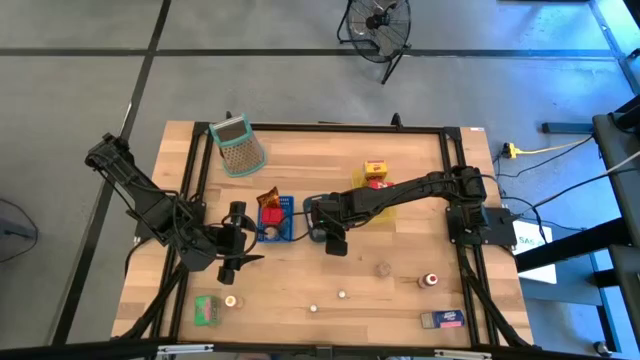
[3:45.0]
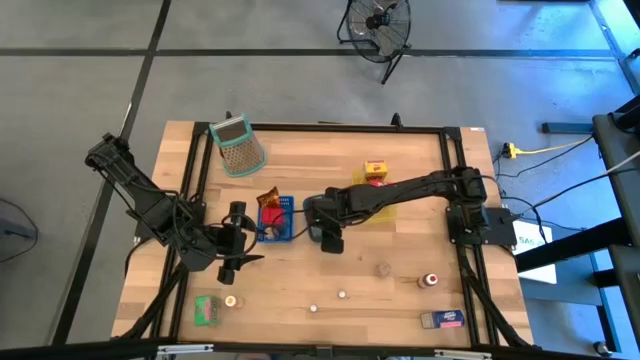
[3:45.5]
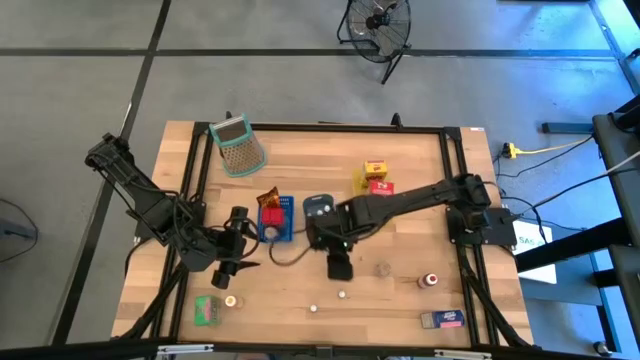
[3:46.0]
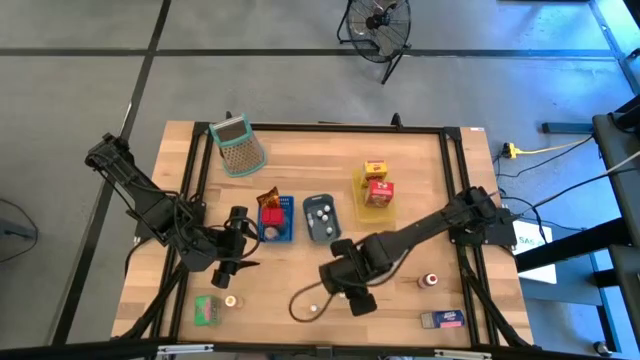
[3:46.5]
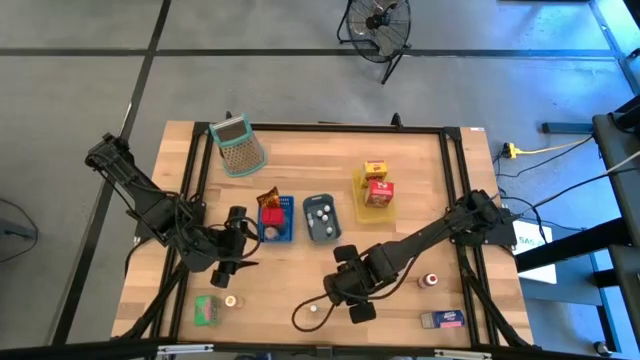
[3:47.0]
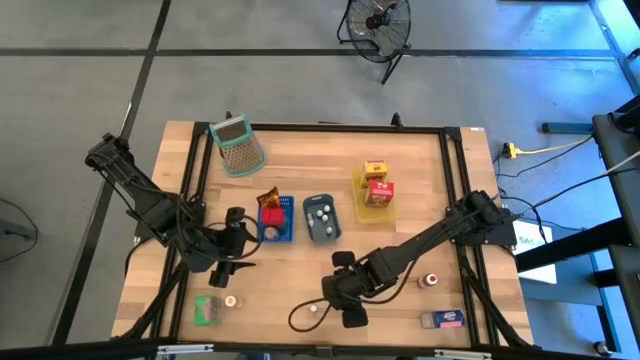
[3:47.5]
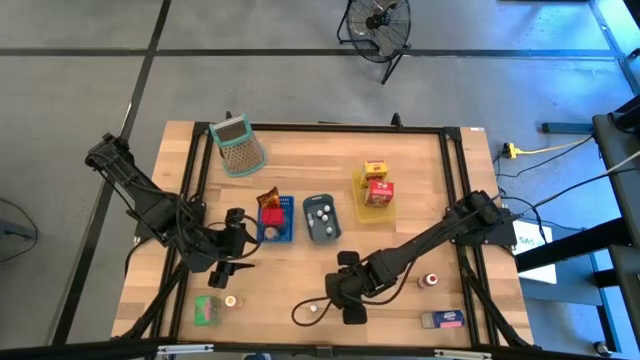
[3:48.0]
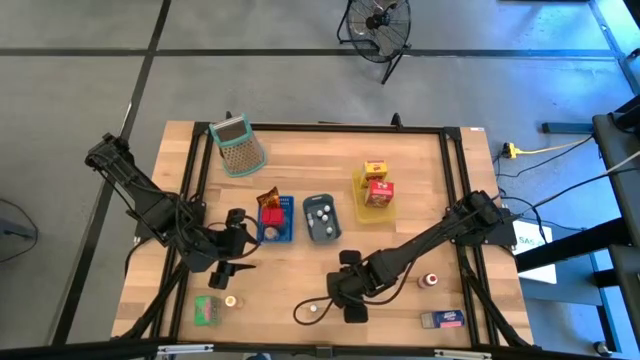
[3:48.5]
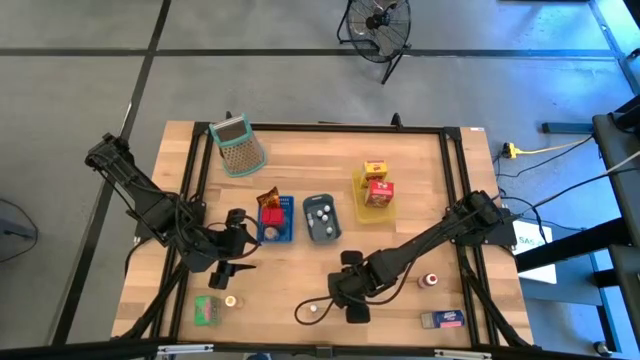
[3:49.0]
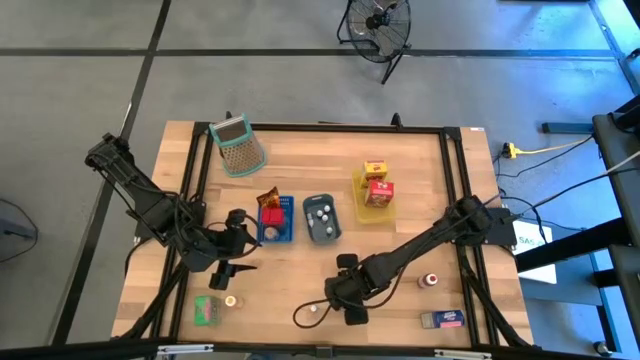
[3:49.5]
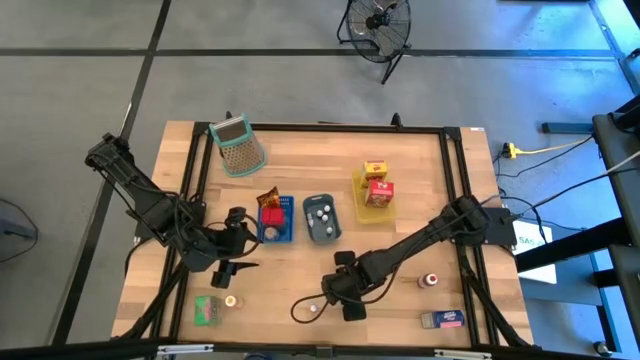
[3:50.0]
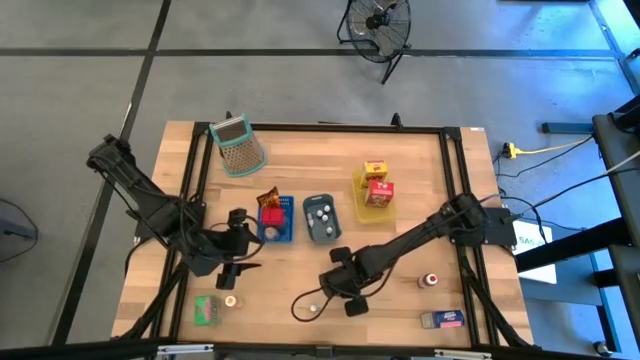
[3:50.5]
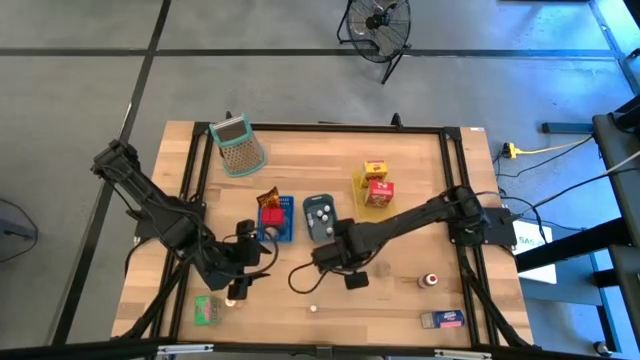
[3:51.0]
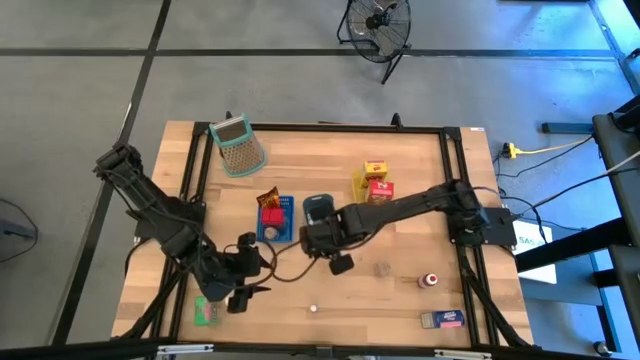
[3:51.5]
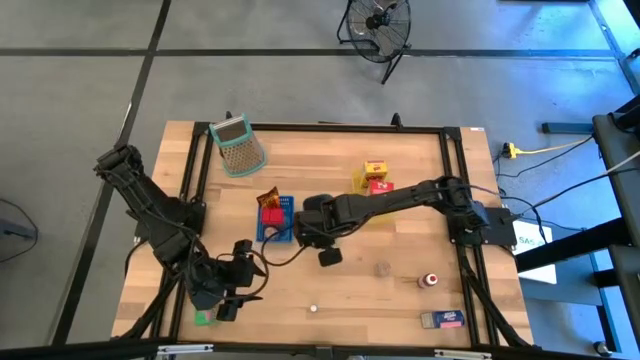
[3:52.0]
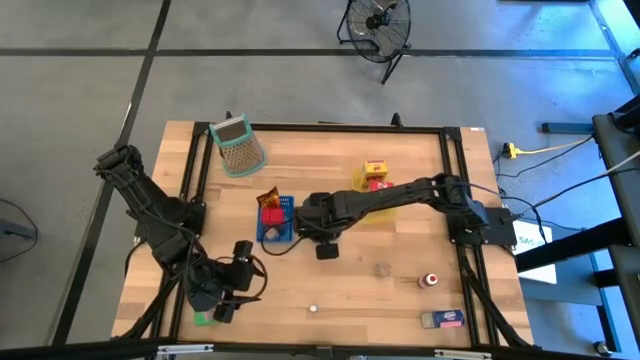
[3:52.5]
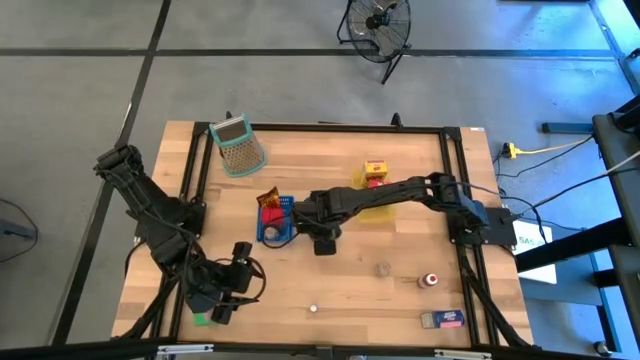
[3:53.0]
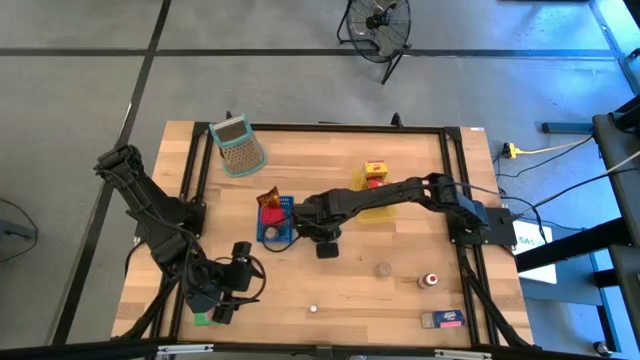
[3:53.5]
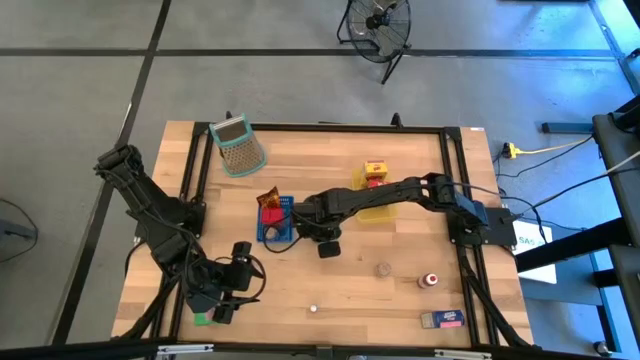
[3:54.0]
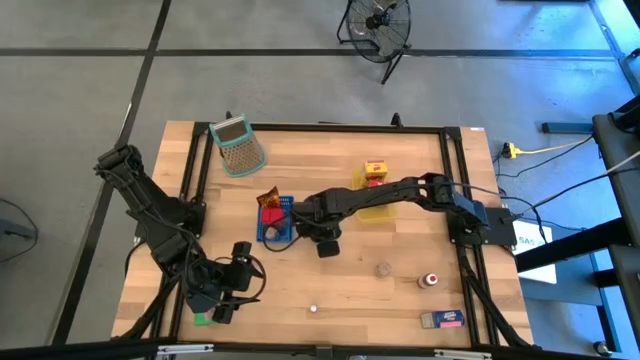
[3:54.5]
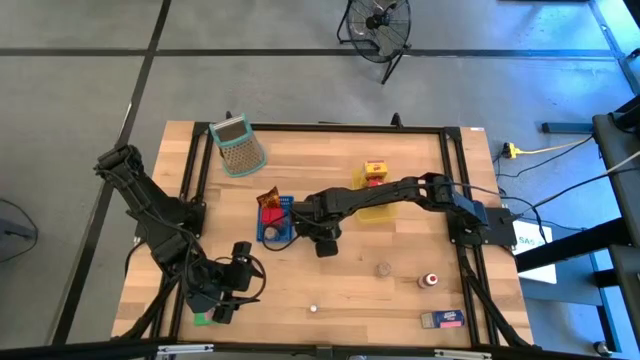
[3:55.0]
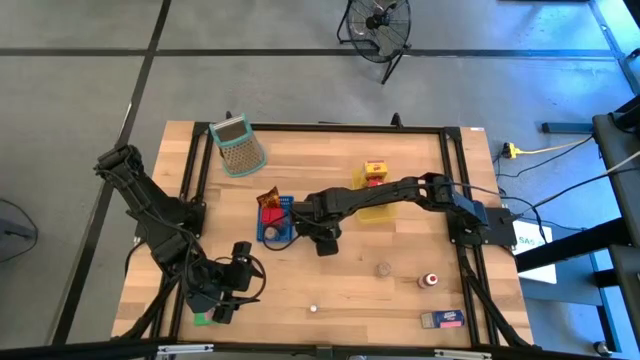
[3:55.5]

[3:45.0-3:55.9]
Task: Pick & Place Kitchen Items
Put the small food coloring bottle into the gray bin

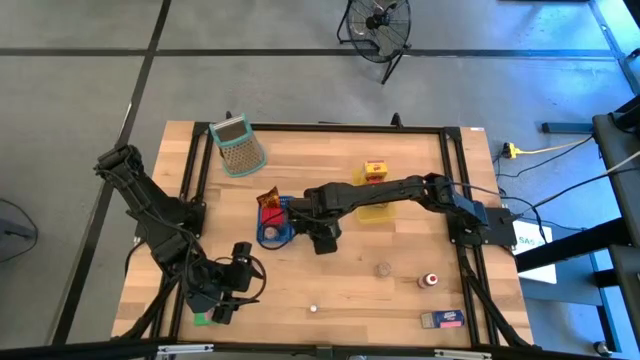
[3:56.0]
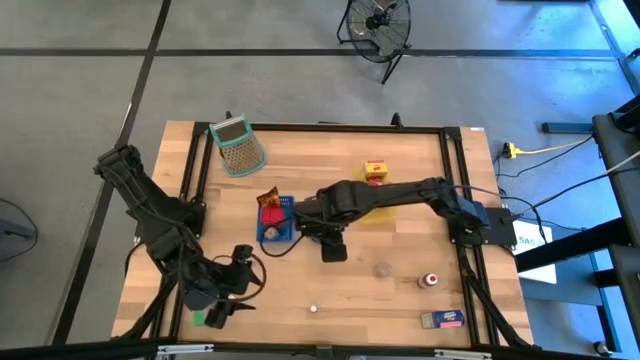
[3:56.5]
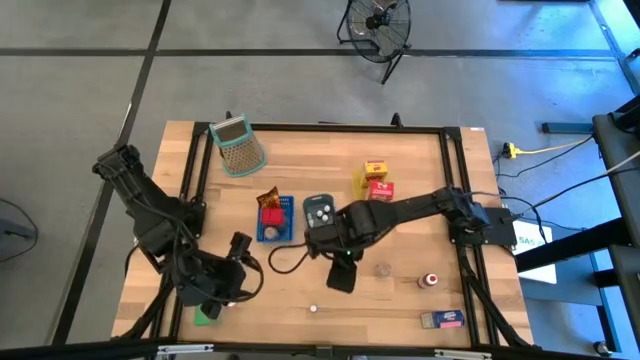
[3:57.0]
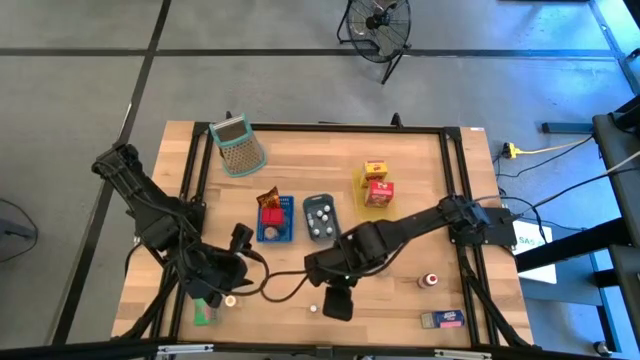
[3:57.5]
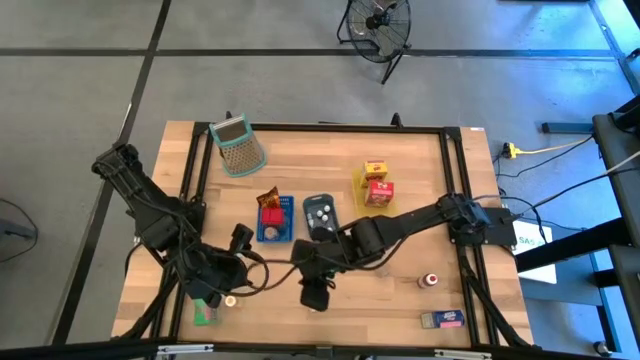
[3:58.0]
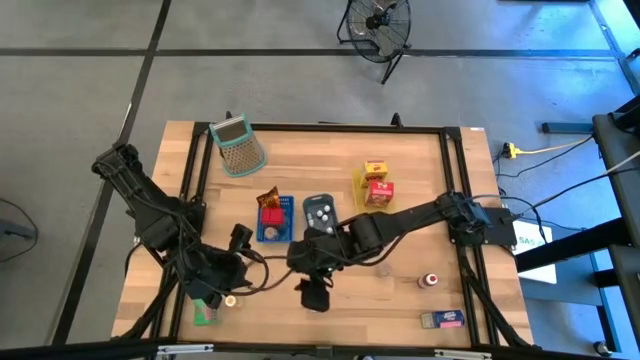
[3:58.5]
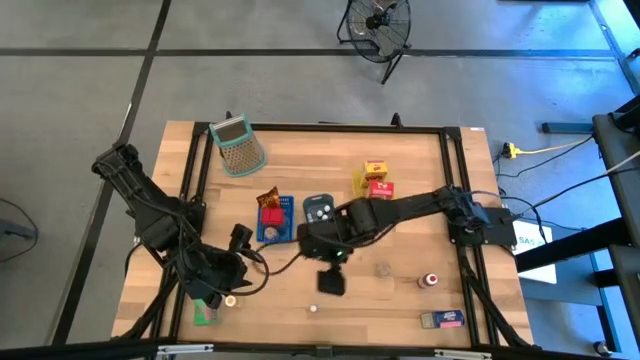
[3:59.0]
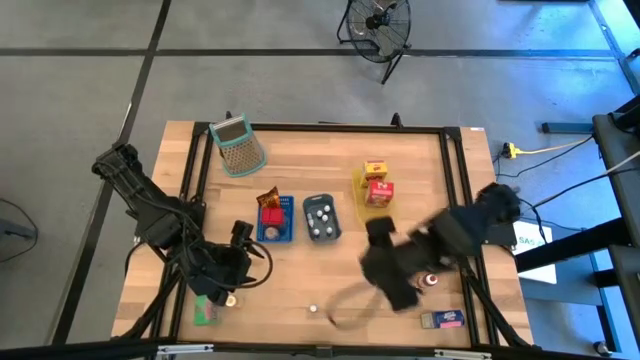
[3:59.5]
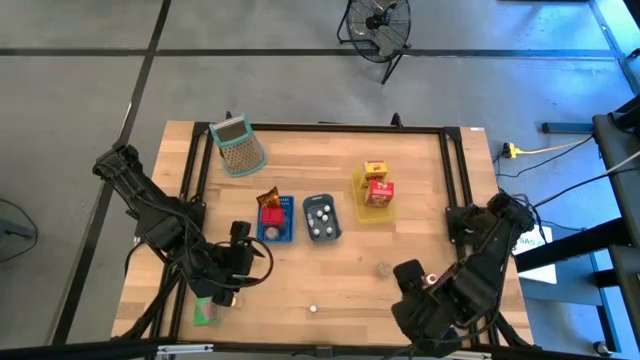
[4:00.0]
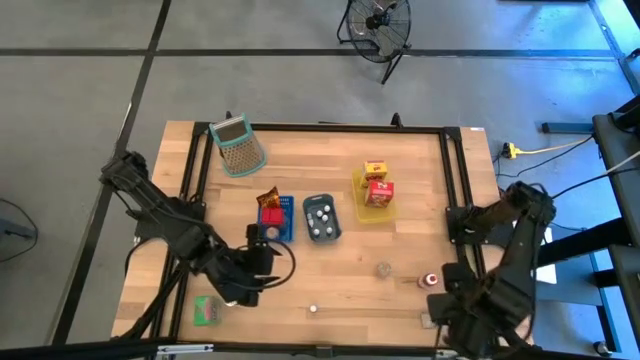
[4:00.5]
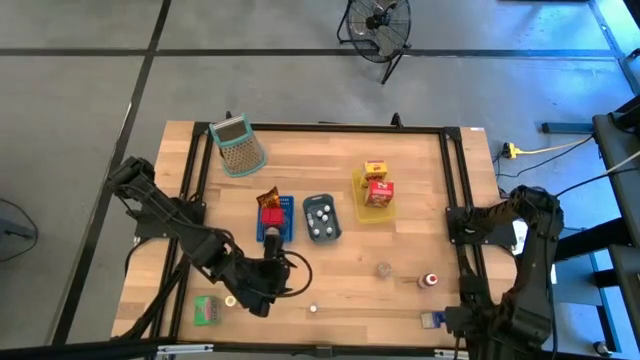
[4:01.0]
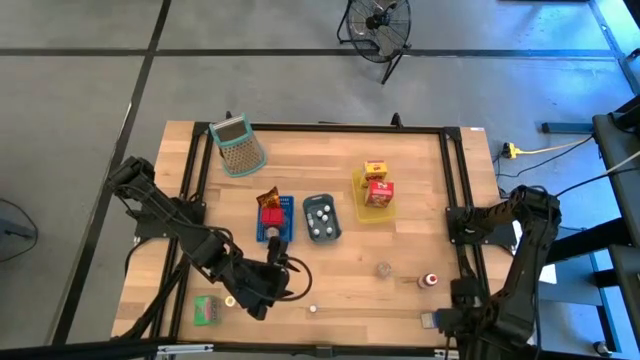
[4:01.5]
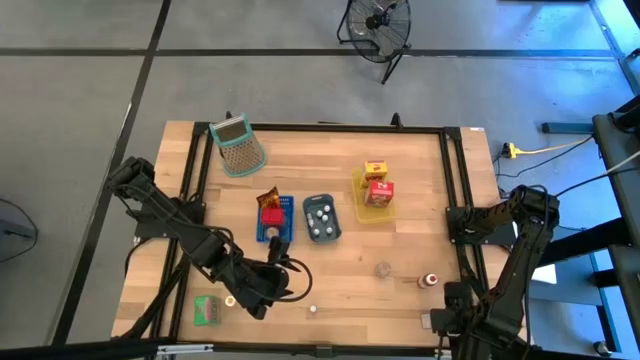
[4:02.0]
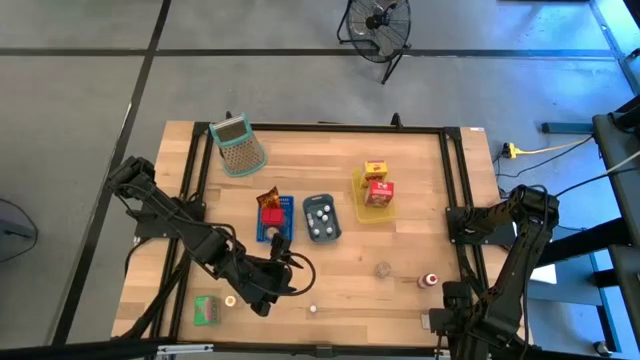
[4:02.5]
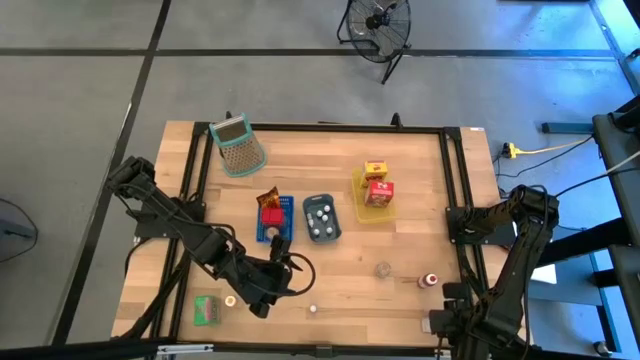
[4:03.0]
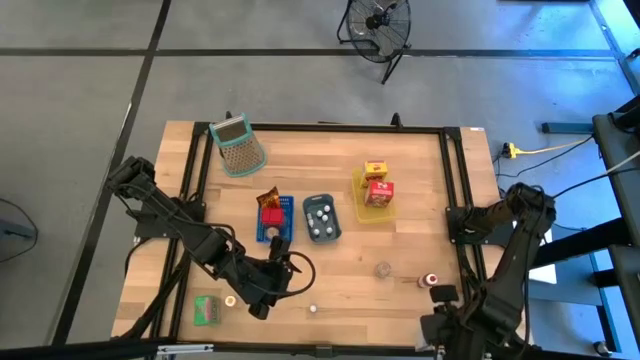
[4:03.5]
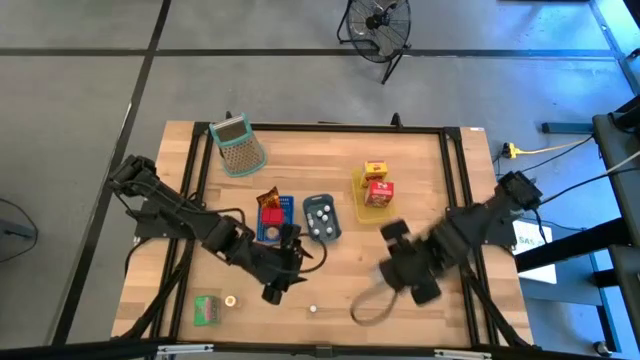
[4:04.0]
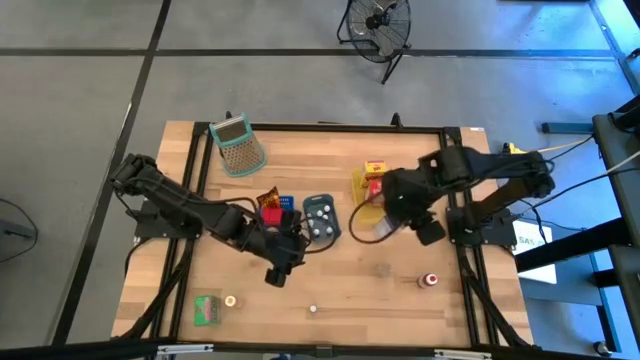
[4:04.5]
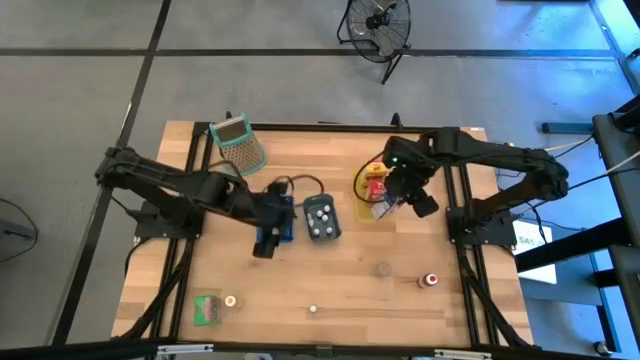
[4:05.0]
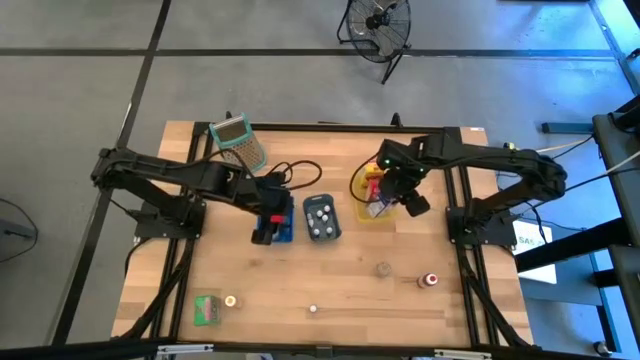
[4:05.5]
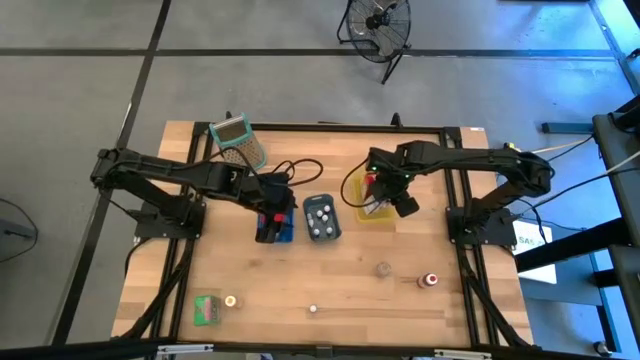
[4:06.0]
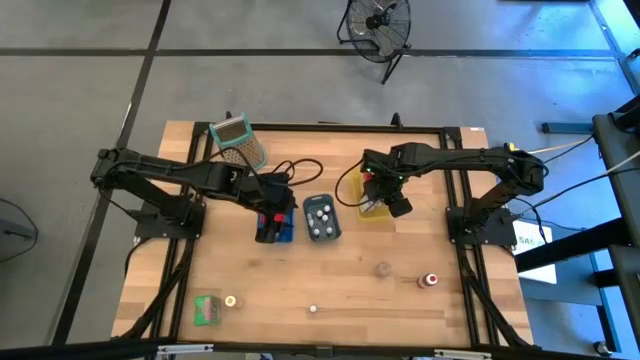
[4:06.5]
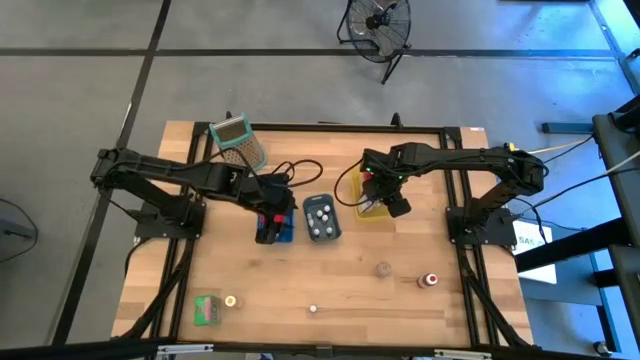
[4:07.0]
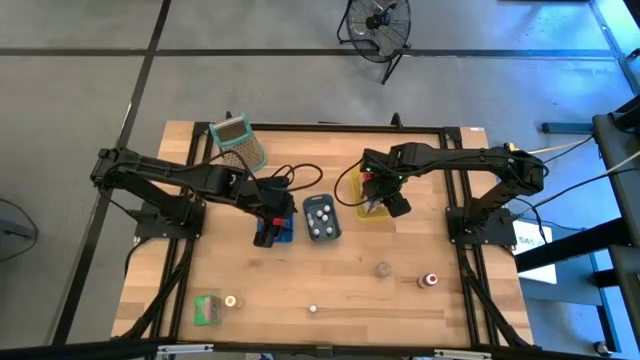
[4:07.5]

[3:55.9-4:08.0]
Put the blue cereal box into the yellow bin
